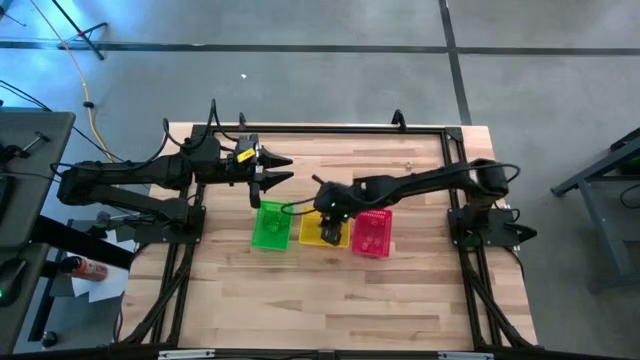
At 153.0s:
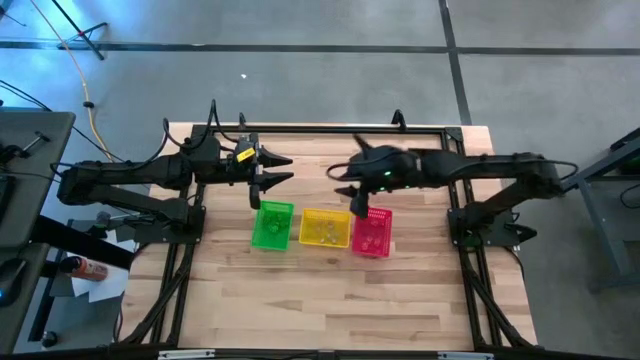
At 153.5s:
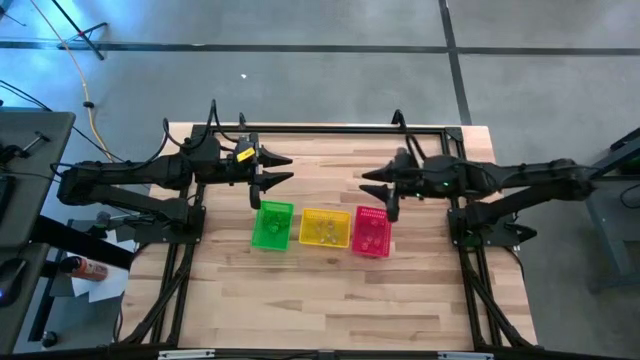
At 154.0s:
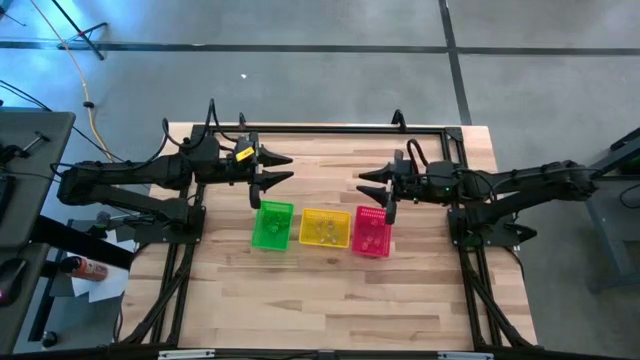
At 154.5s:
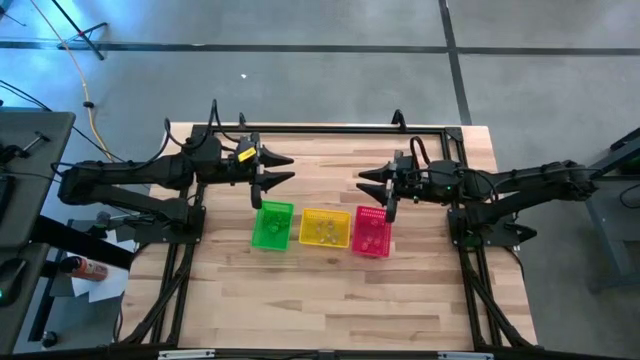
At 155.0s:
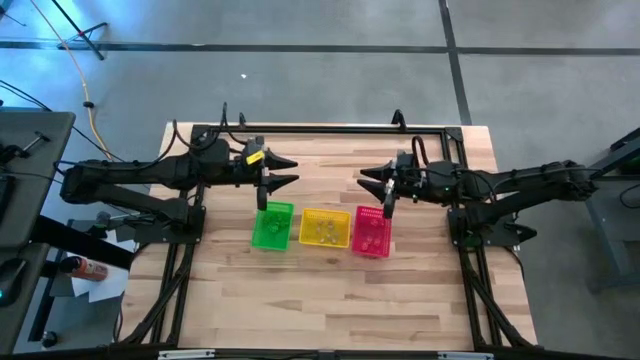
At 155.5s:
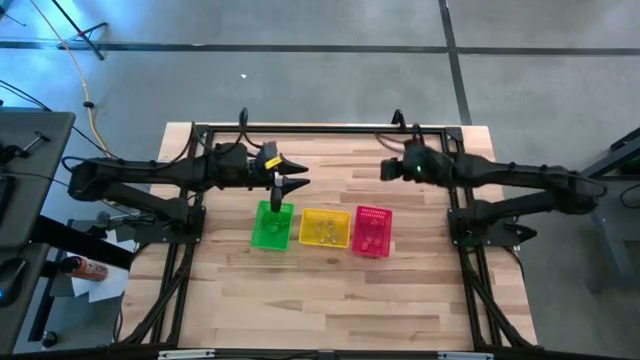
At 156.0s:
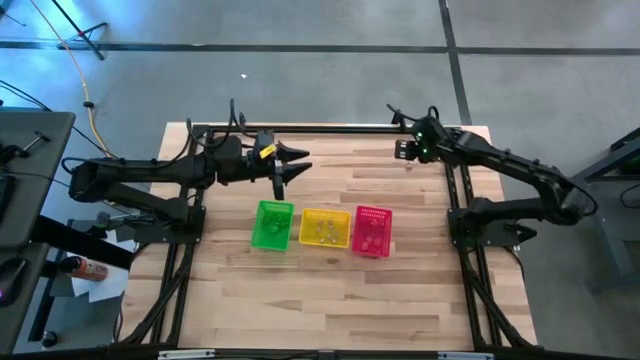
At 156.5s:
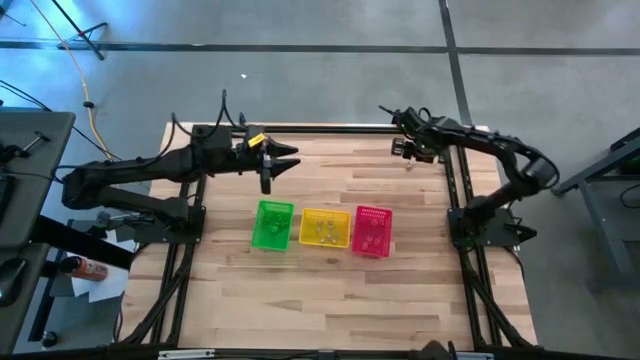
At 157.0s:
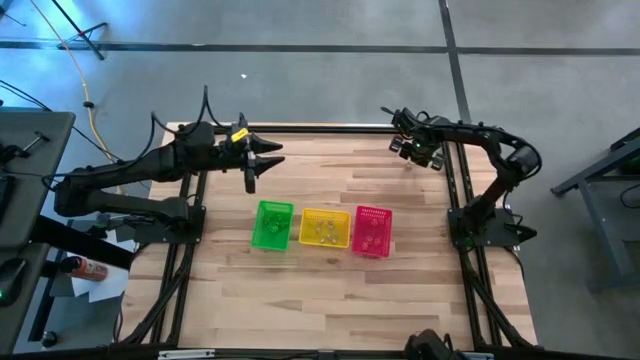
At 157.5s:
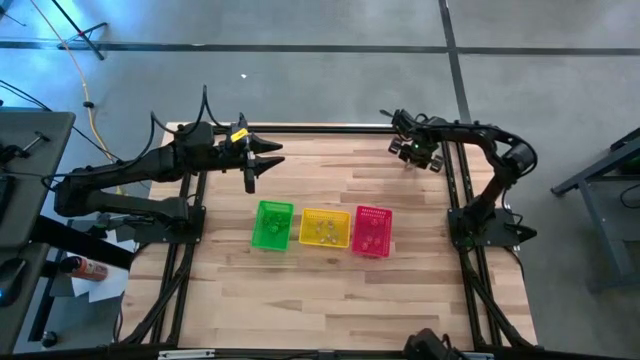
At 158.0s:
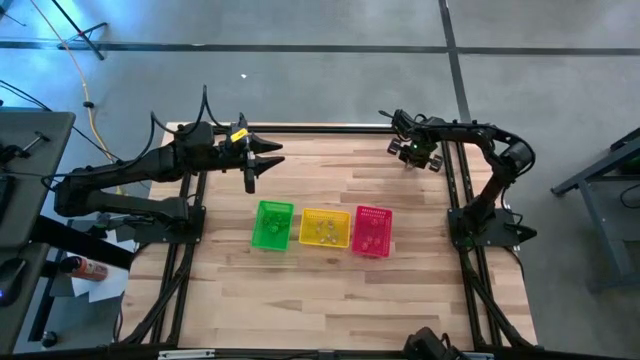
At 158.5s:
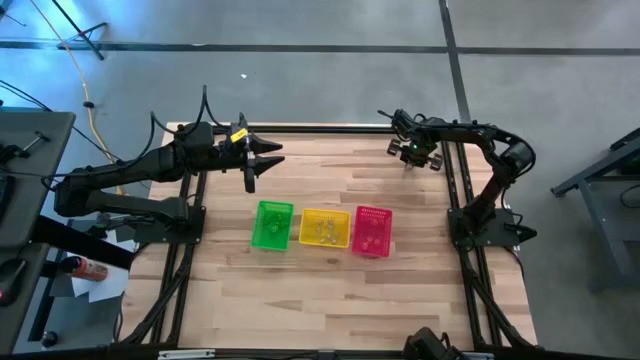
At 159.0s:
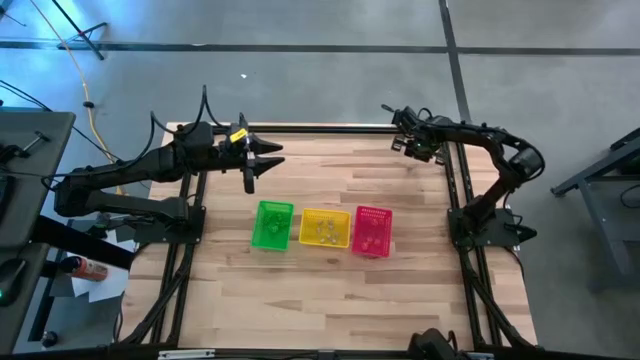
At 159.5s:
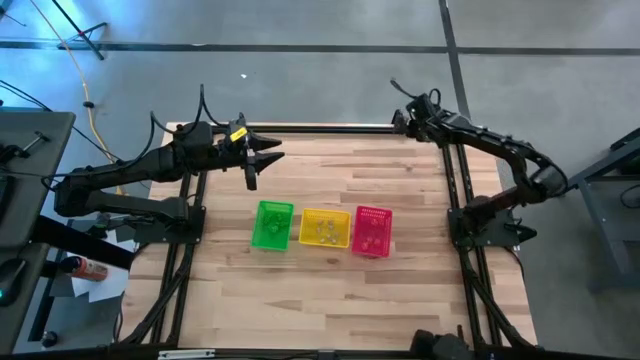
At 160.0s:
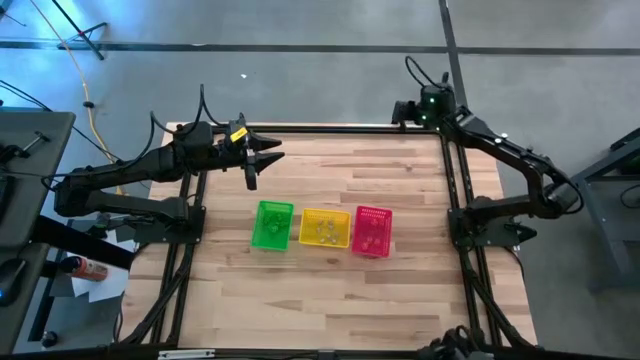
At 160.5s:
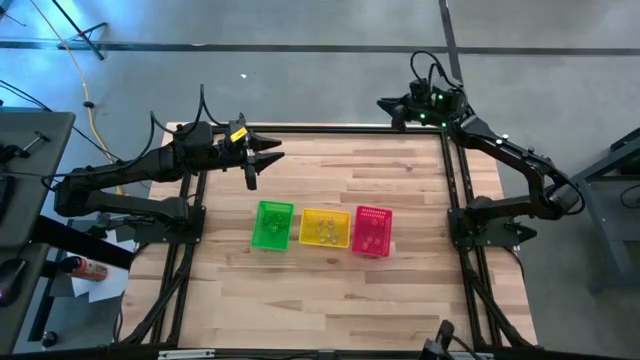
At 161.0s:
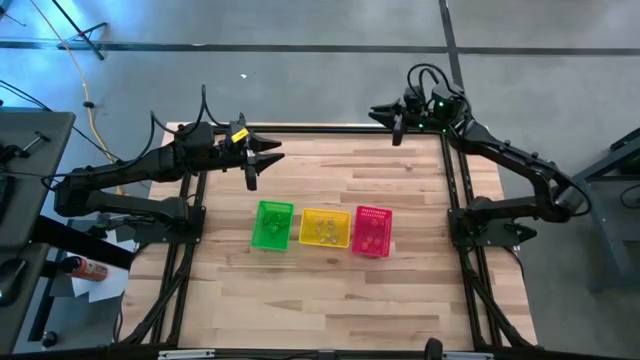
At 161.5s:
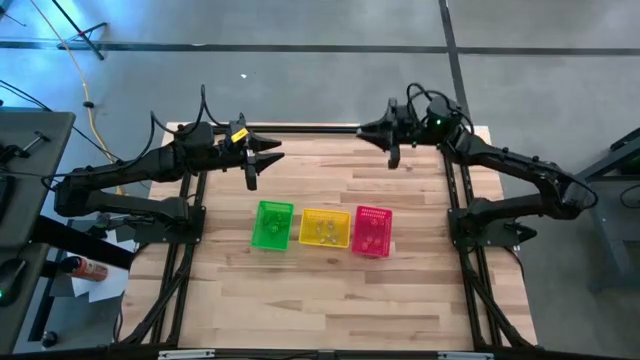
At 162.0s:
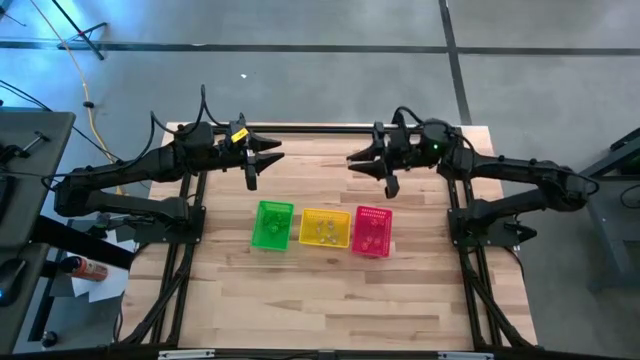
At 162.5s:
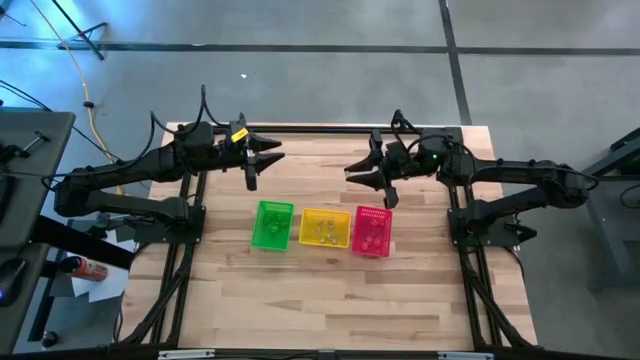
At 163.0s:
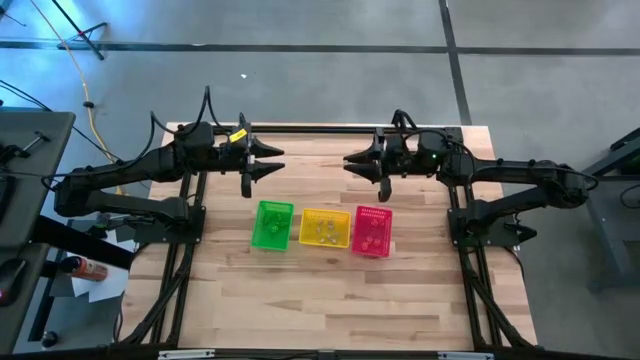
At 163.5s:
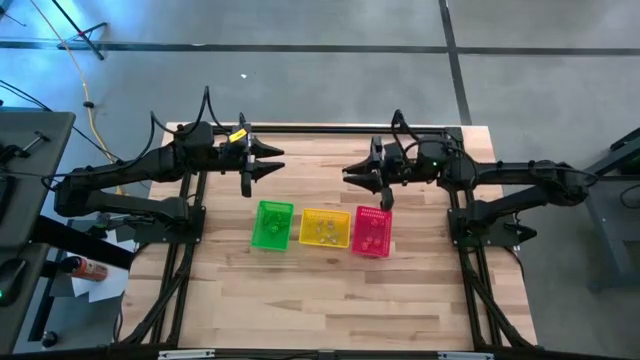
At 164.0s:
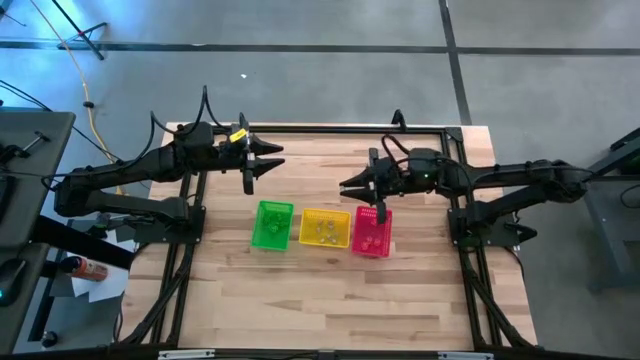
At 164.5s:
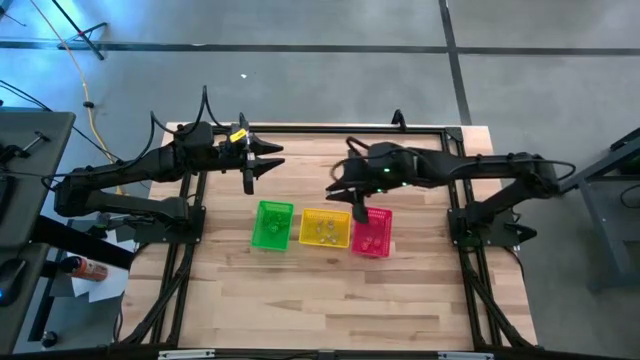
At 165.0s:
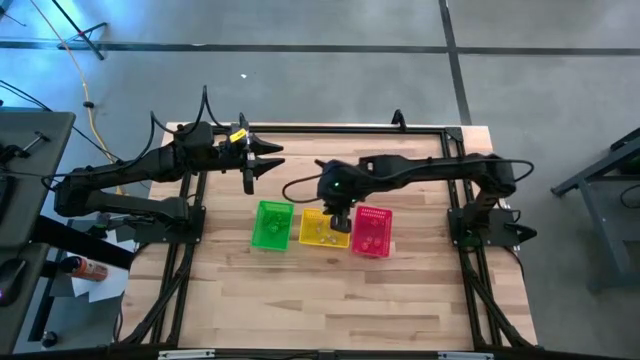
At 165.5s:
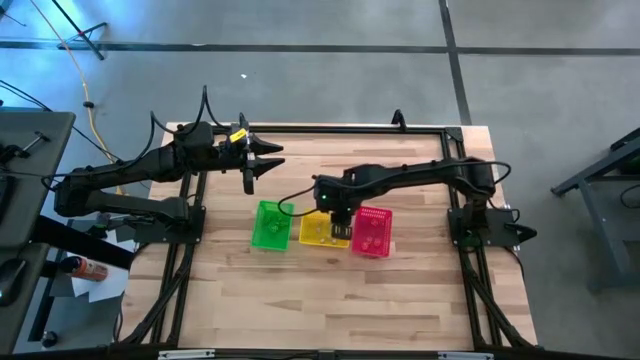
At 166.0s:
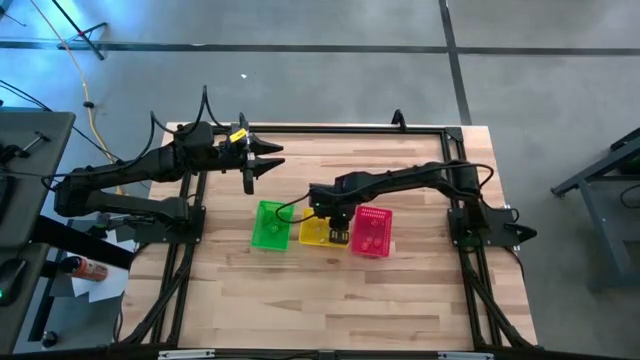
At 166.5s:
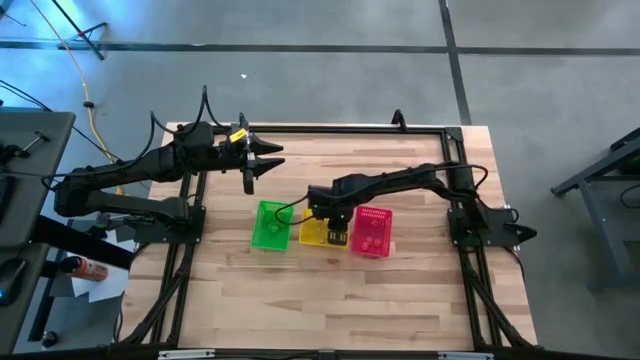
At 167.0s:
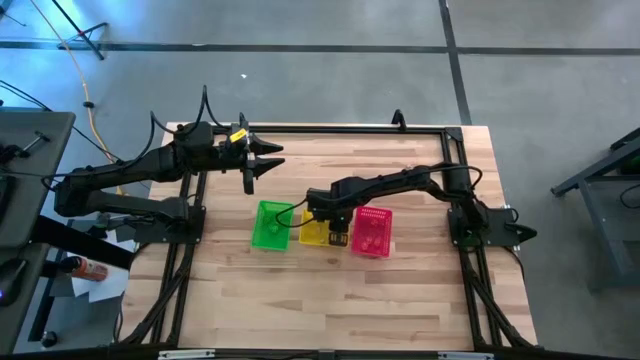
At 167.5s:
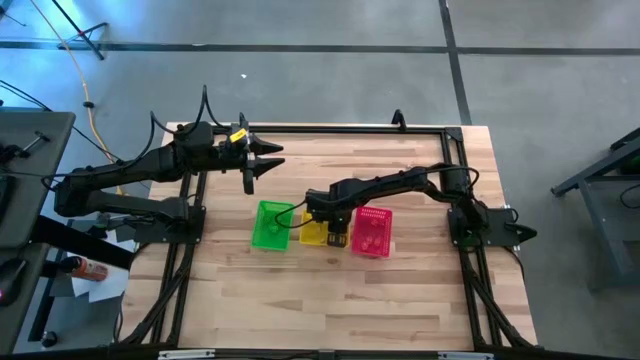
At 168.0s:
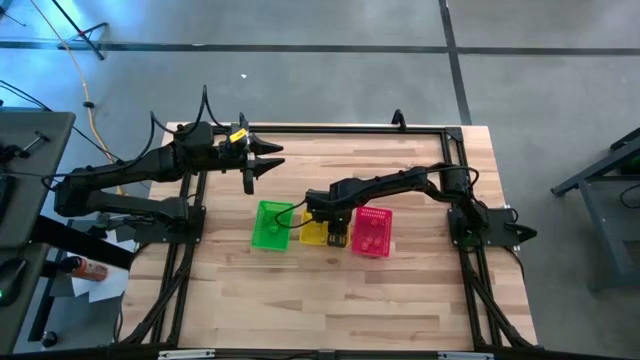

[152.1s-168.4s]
Task: Sort Halloween decoration
Put the white skull toy into the yellow basket

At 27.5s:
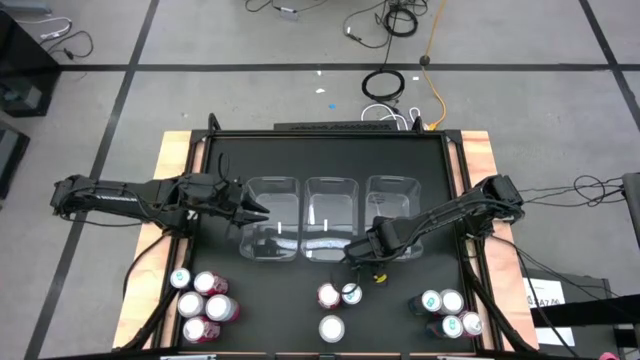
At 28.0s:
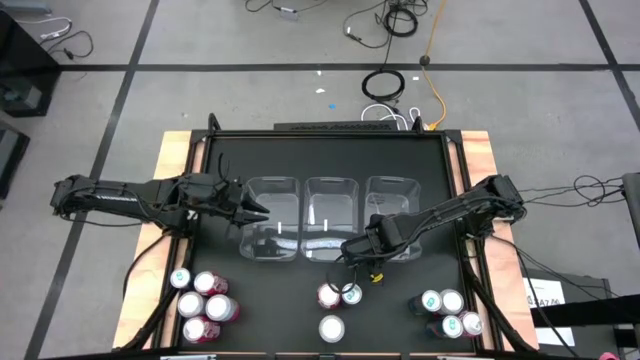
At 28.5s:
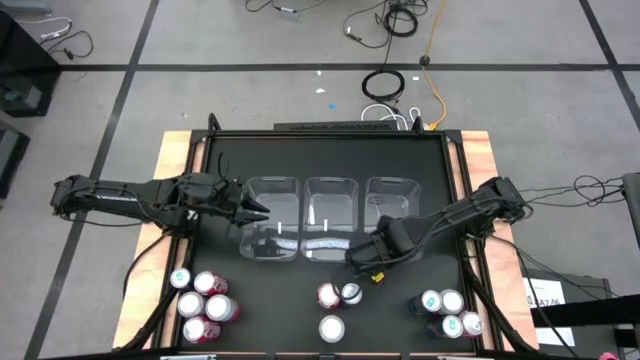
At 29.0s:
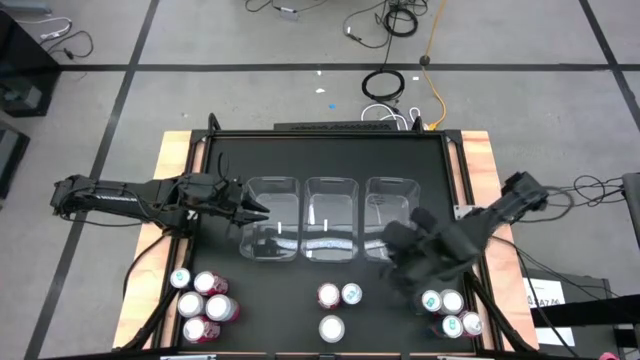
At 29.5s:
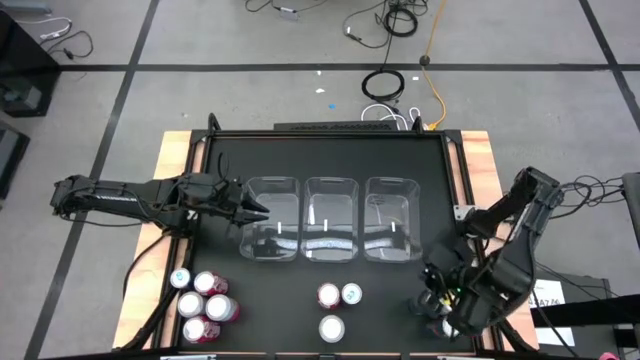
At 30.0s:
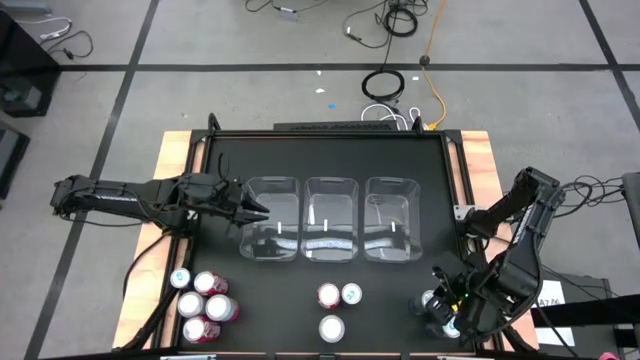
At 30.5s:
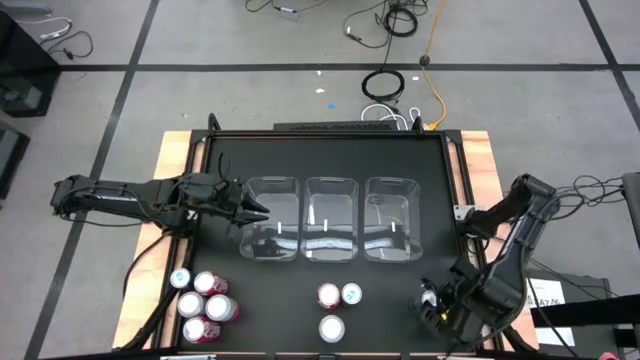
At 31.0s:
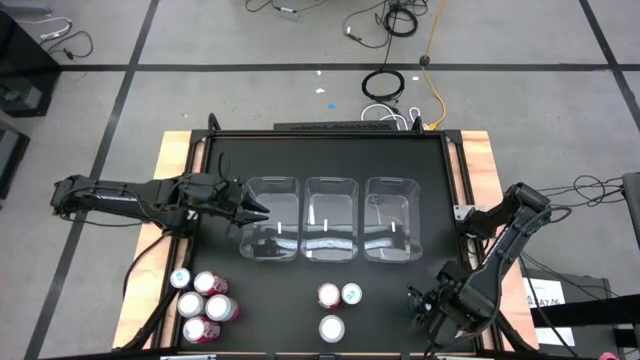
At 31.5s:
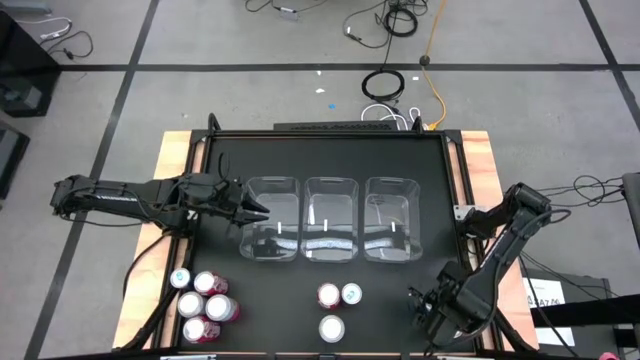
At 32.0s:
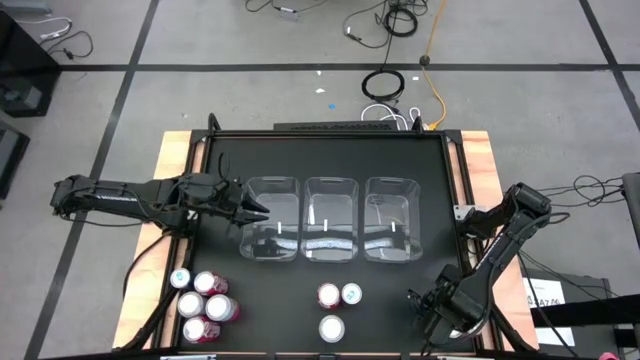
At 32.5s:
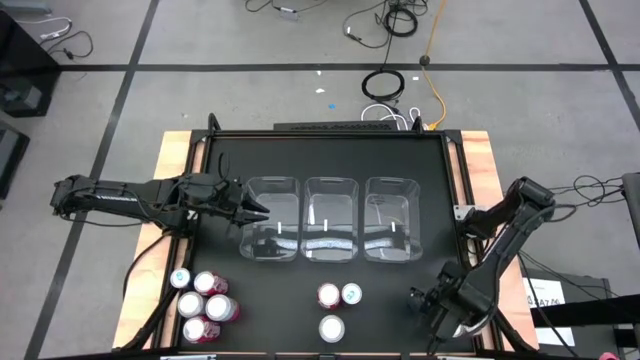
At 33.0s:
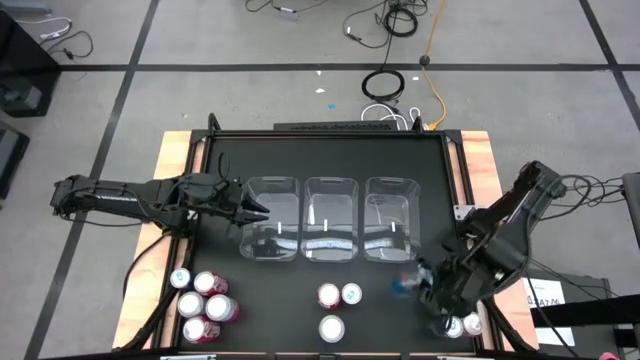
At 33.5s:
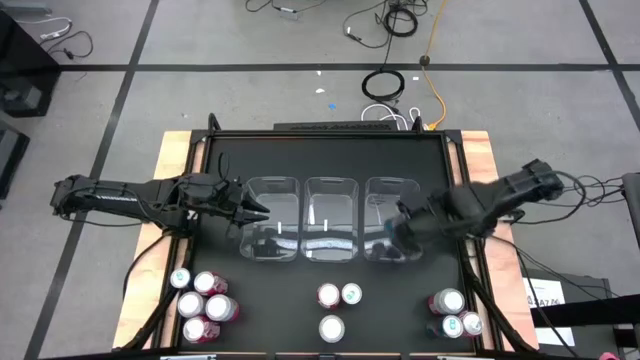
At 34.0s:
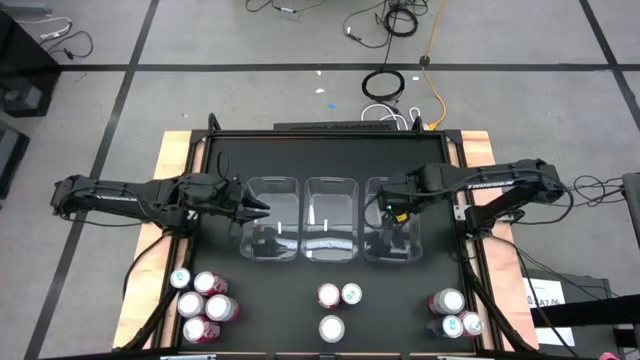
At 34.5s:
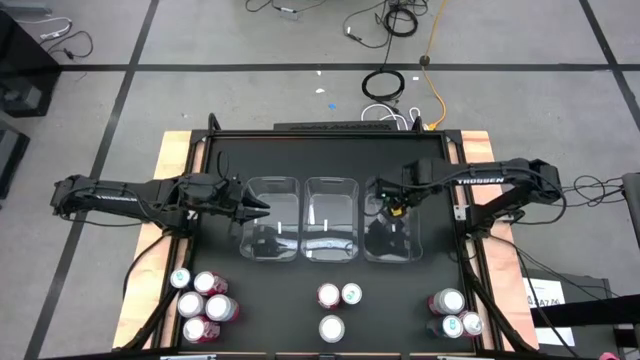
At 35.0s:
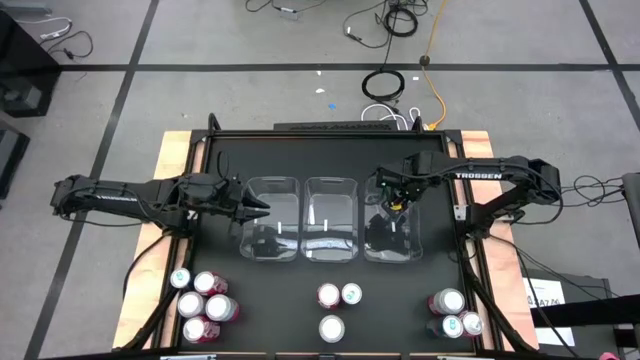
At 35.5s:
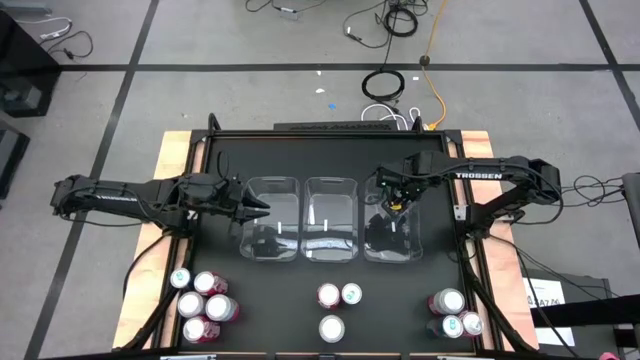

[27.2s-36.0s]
Task: Sort soda cans
Put the top right silver blue soda can into the middle right transparent bin
